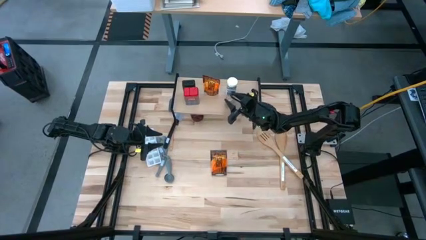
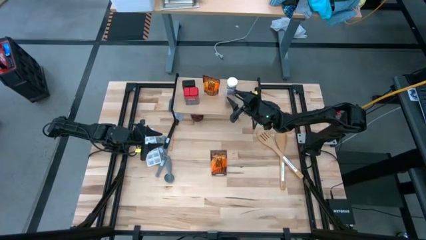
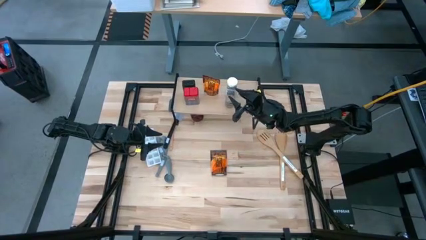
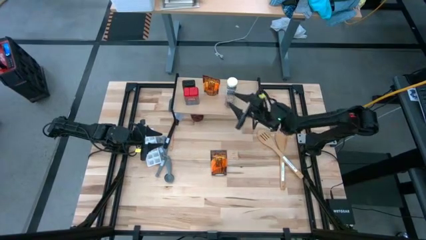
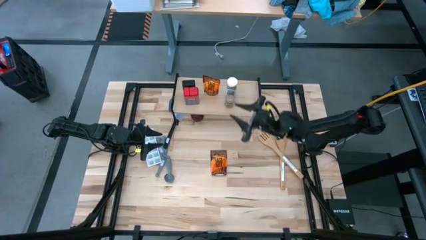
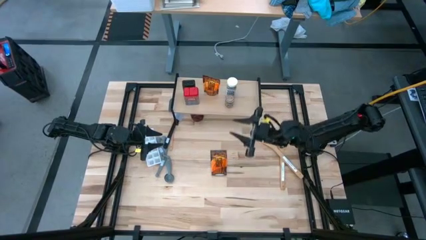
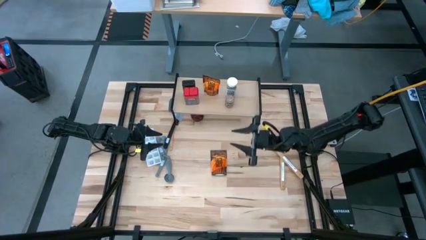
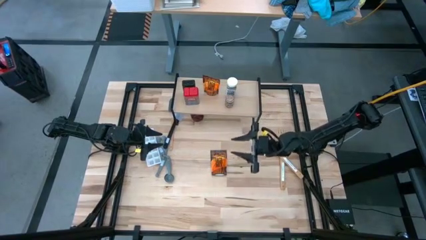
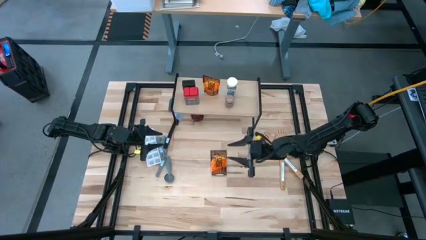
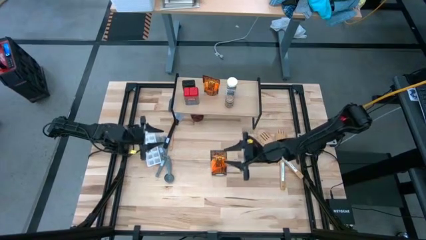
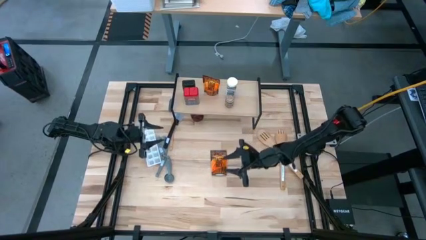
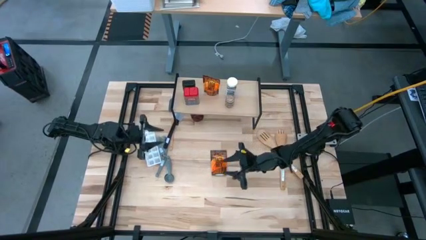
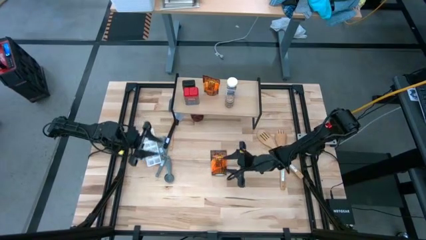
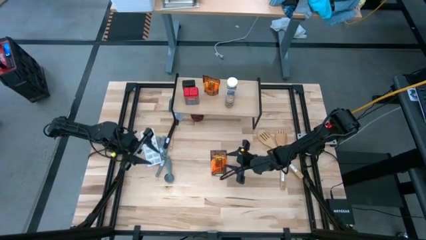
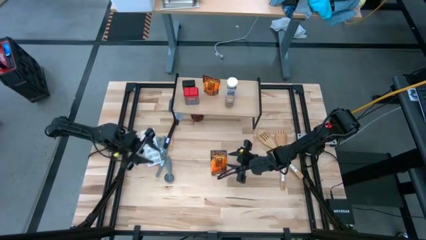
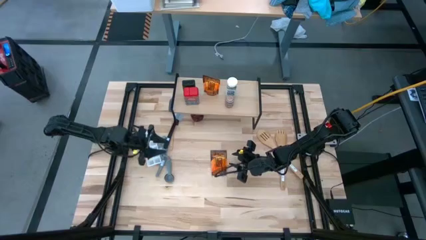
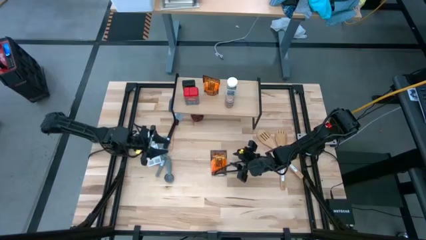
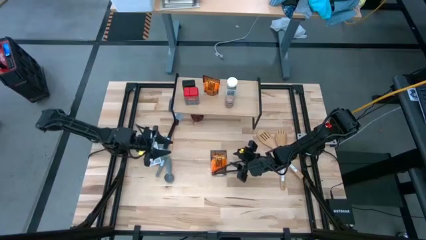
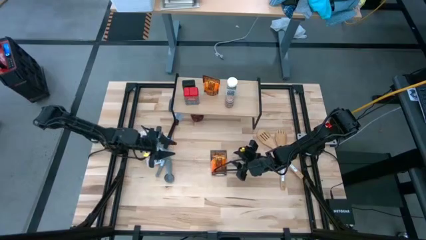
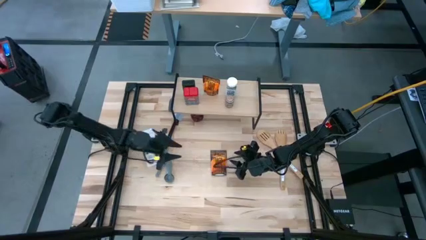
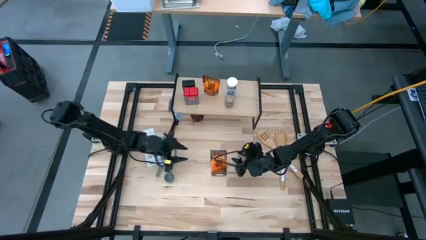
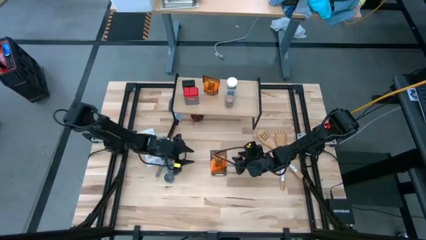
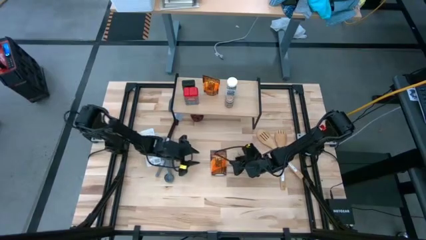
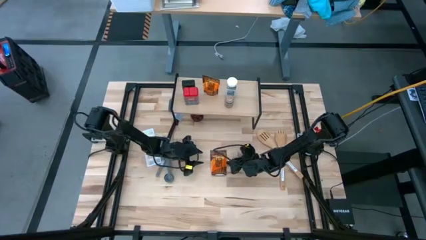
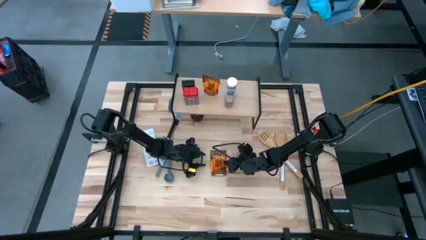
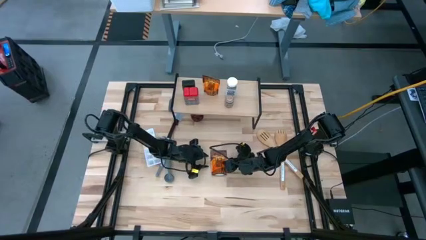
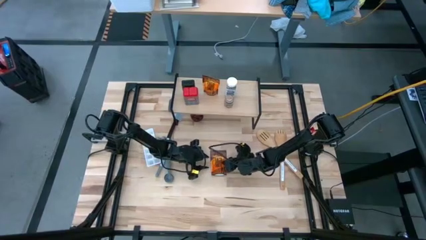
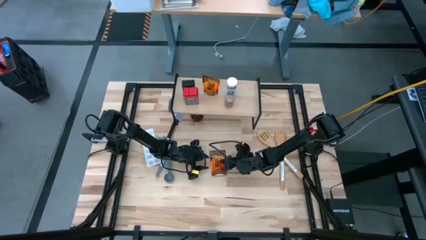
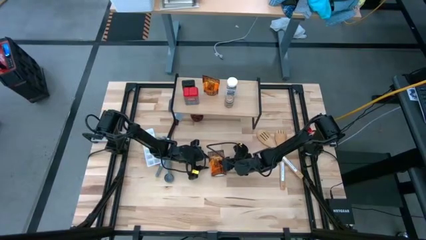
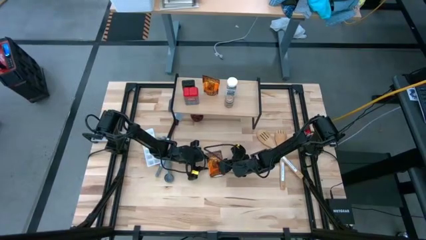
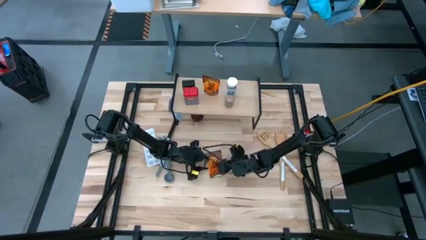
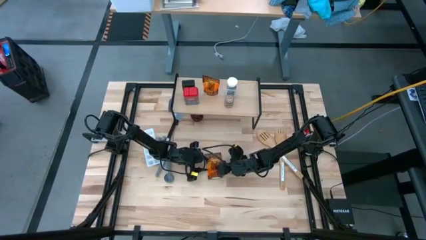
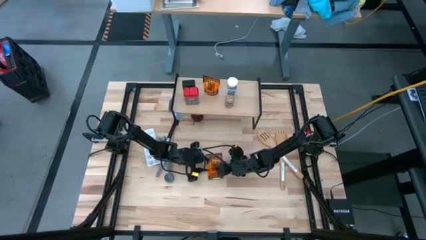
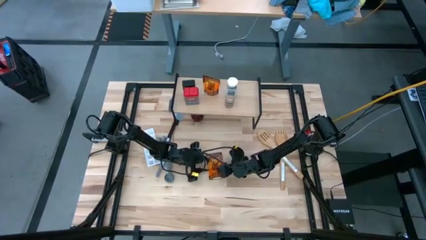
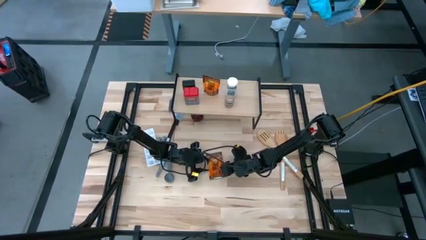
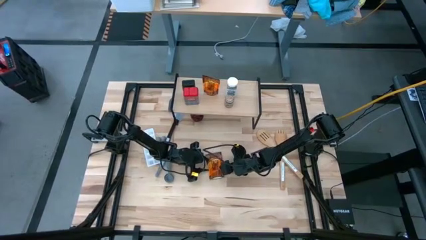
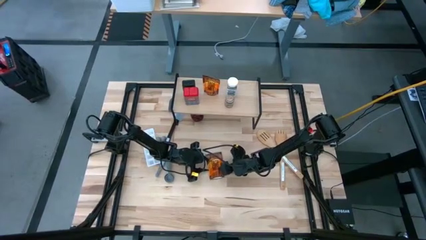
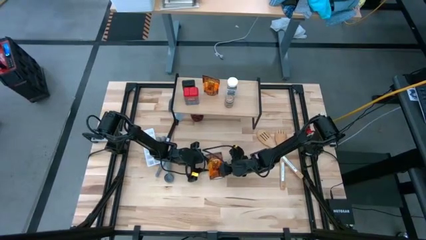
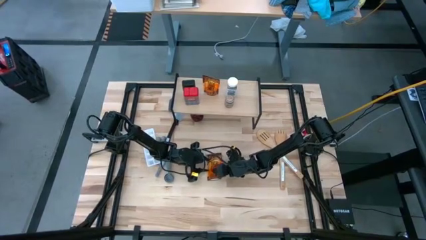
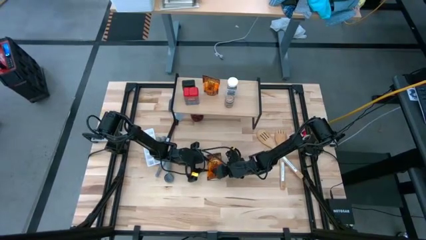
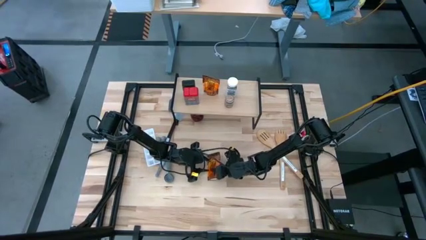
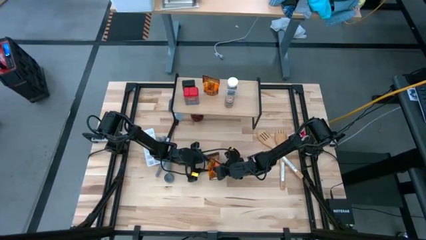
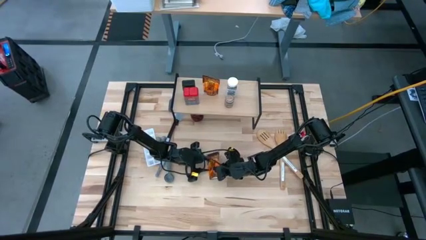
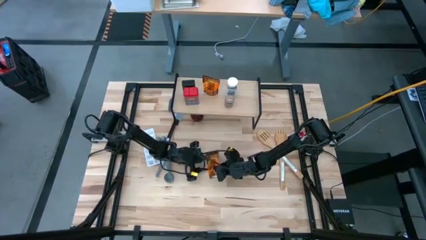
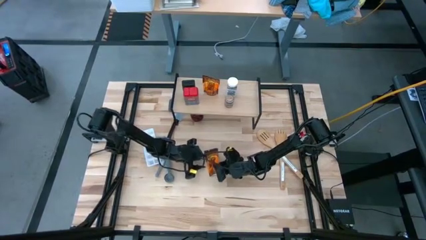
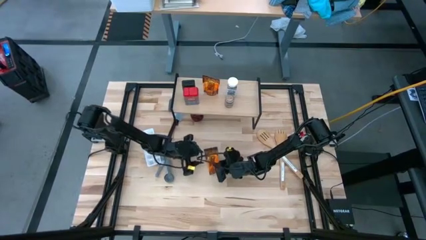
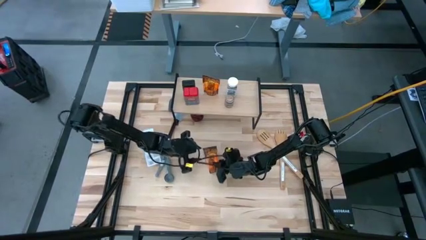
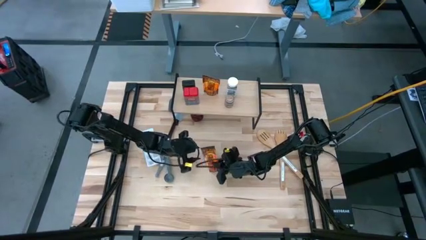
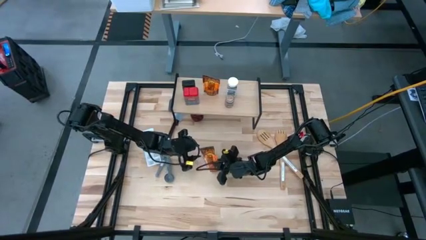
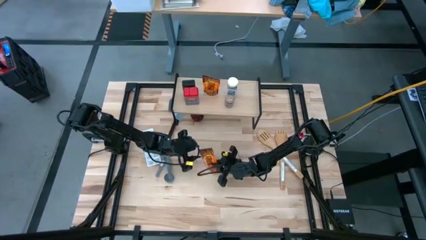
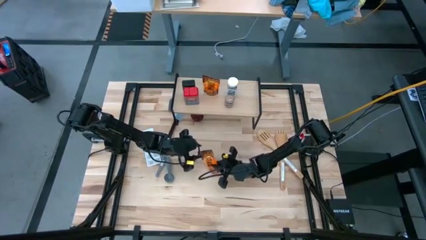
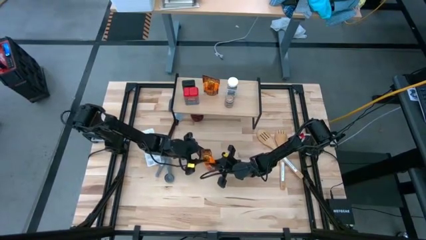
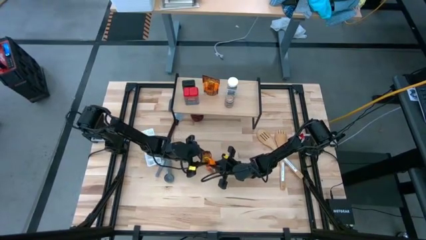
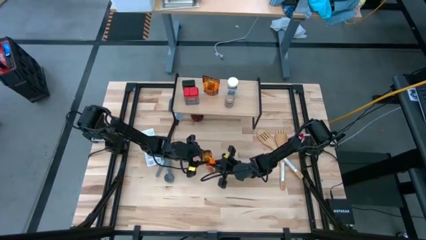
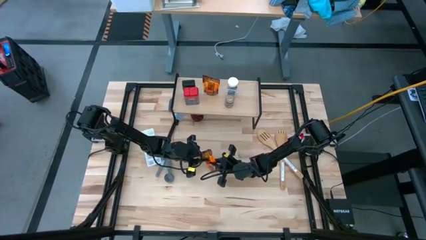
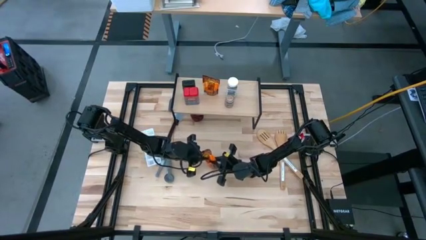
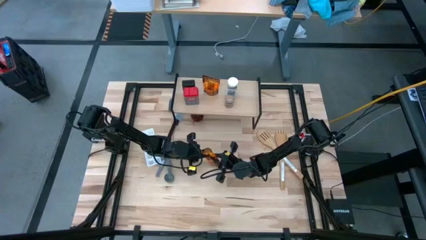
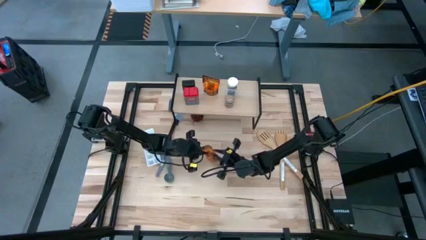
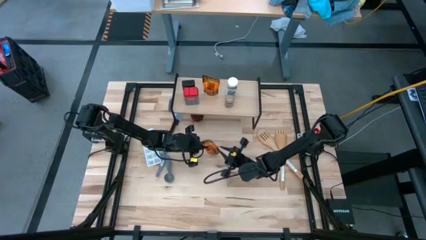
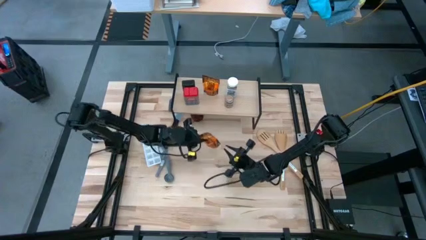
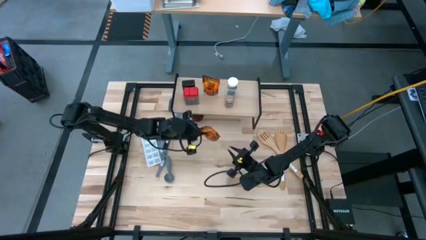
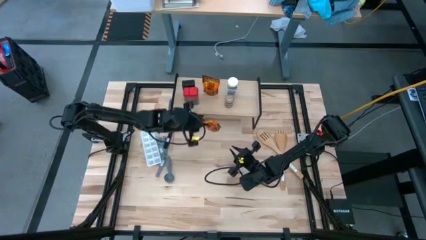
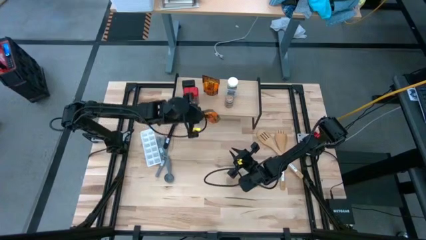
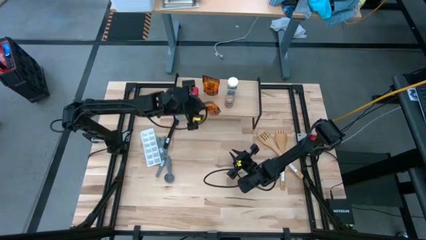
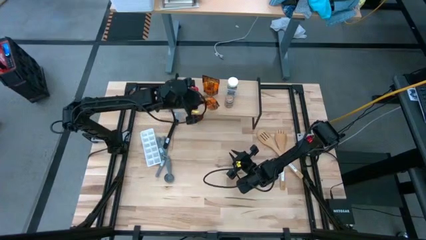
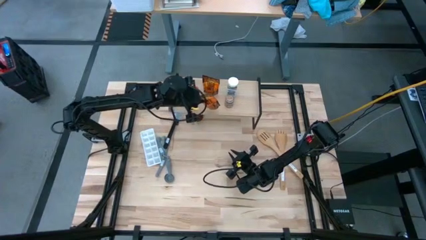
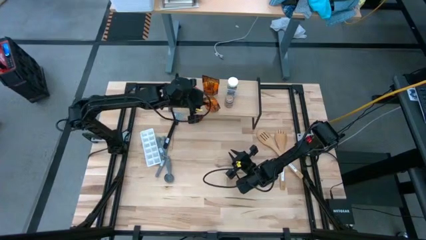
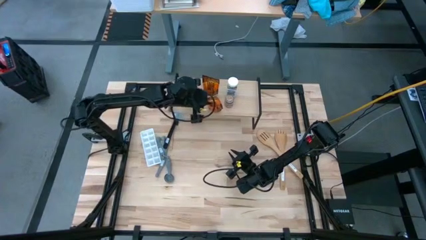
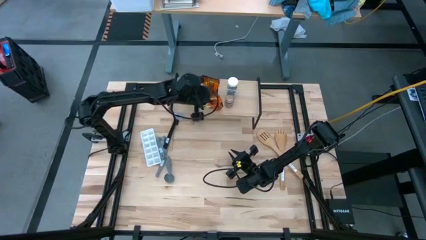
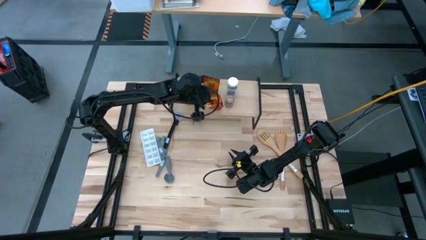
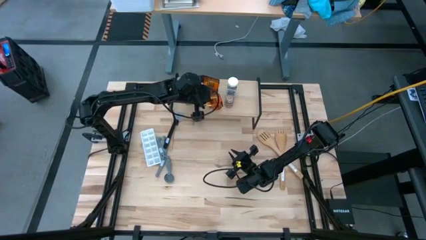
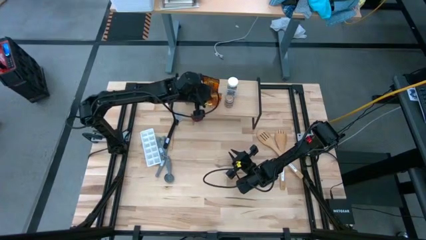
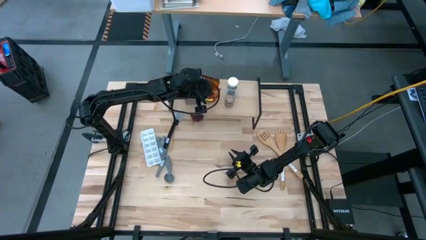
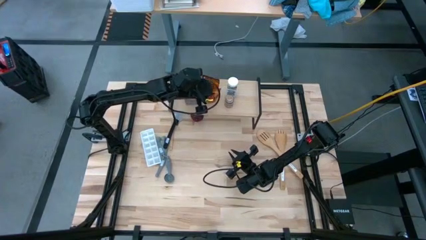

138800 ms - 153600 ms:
Task: Shelf spices
Put the orange seasoning pack on the shelf aligned with the other orange seasoning pack

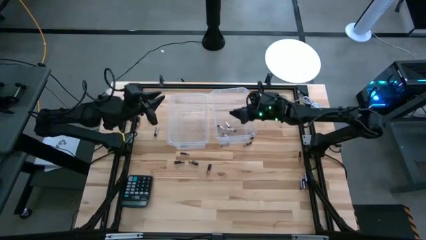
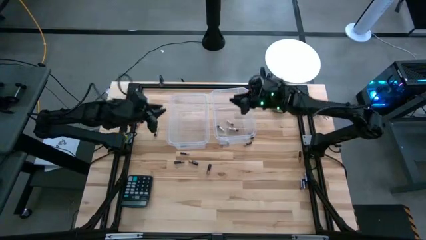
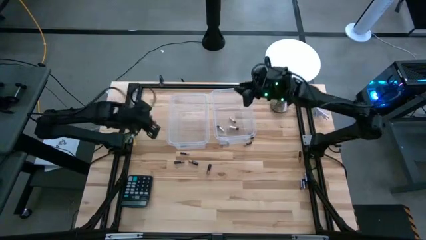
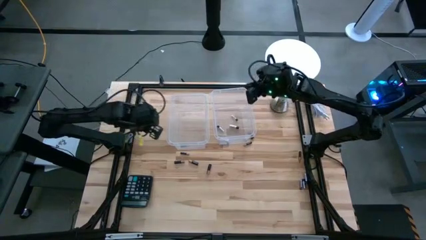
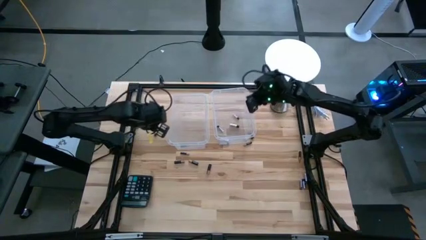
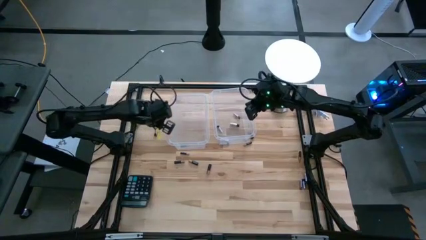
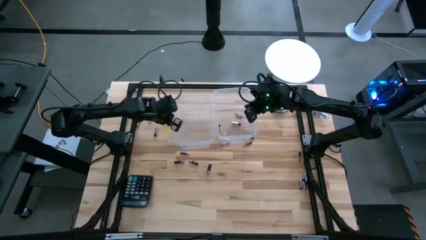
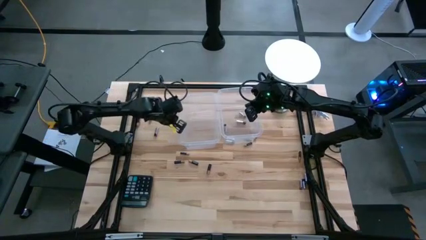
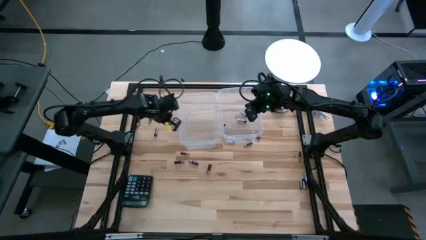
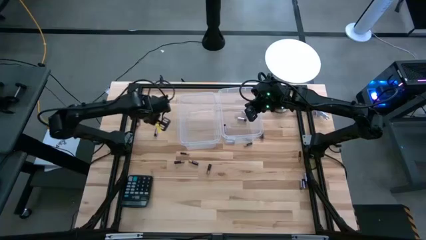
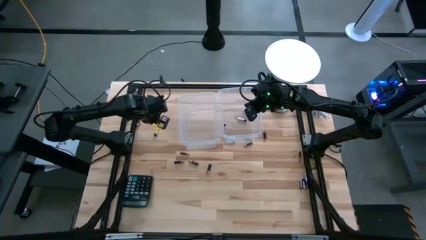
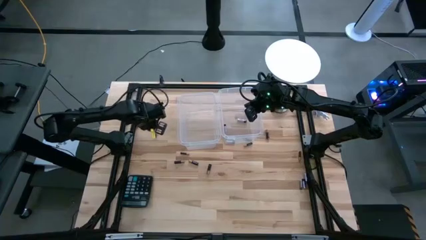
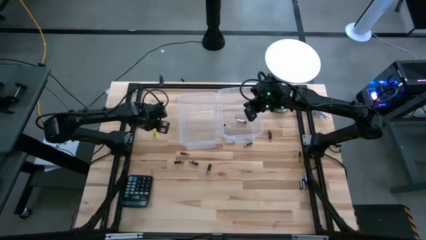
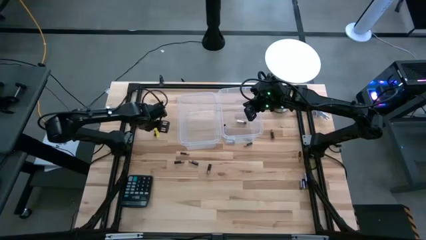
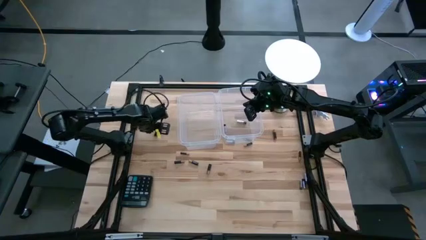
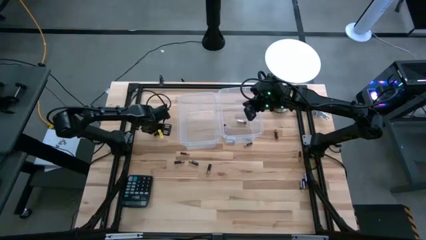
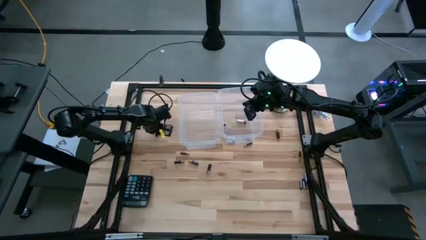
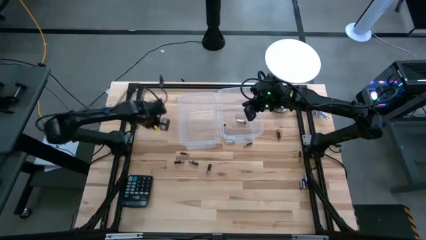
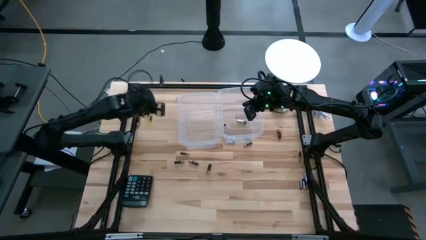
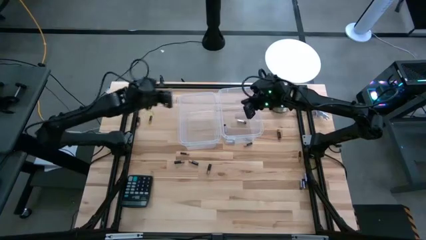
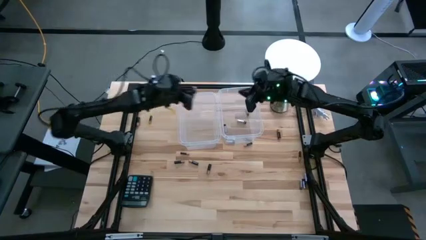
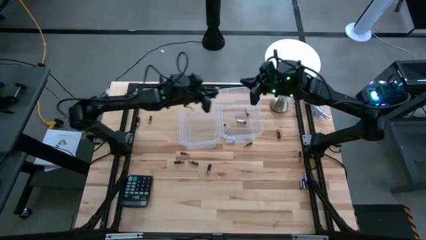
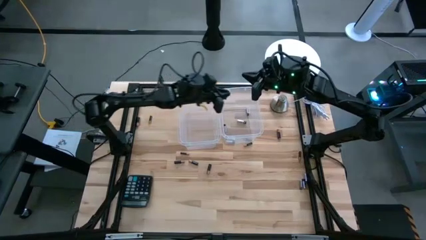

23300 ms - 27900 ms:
Task: Sort batteries
Put silver battery into the right transparent bin
